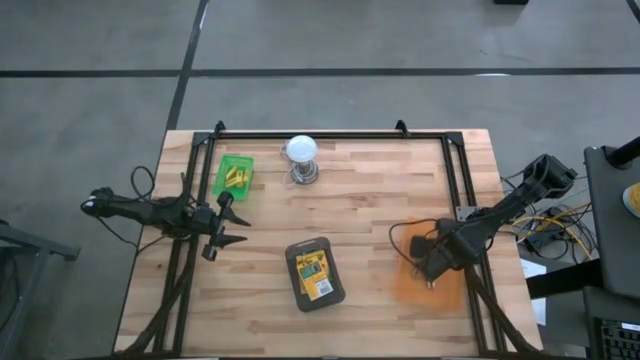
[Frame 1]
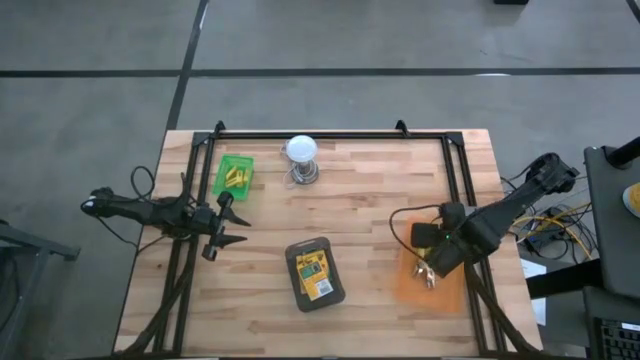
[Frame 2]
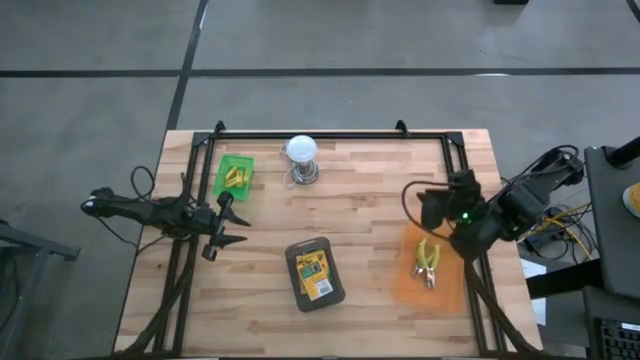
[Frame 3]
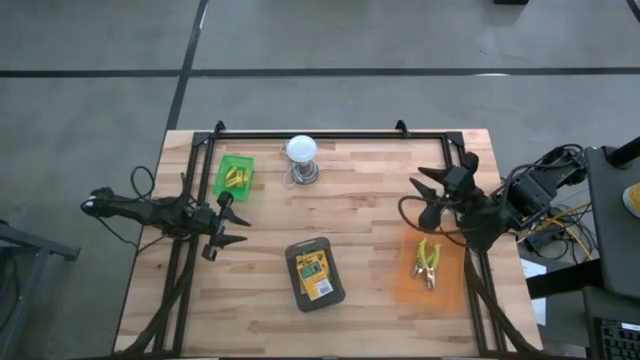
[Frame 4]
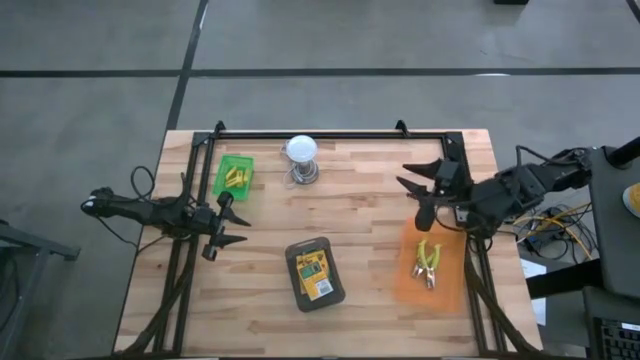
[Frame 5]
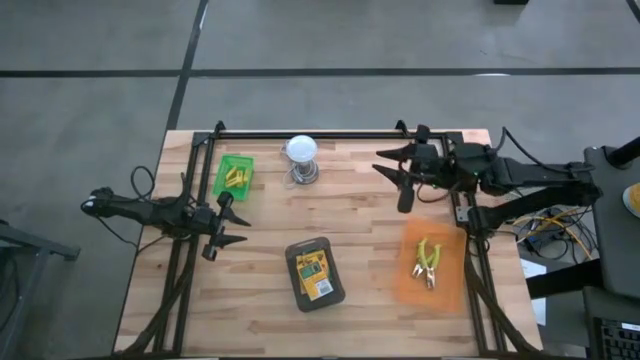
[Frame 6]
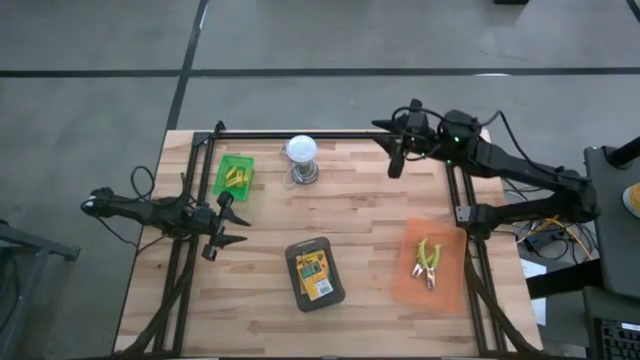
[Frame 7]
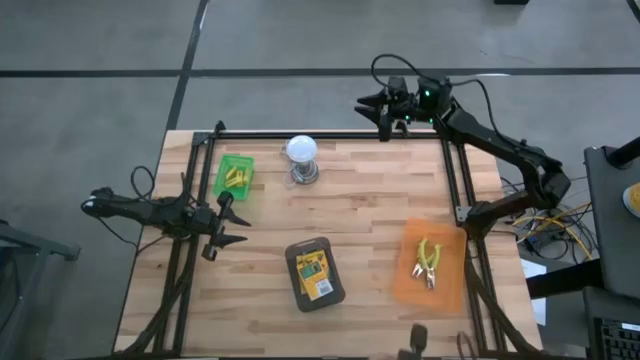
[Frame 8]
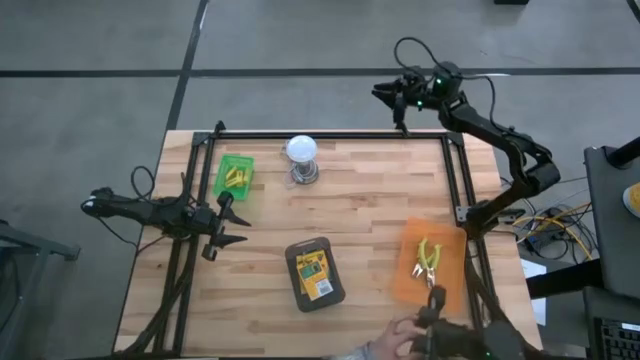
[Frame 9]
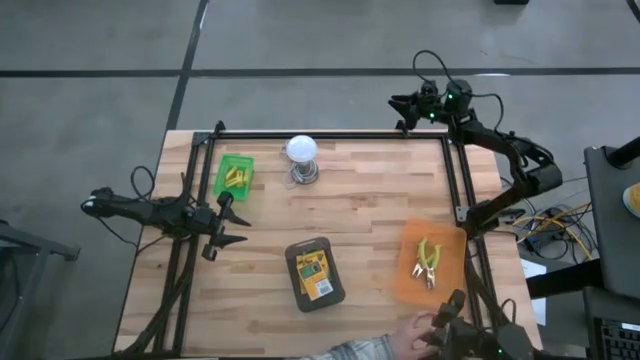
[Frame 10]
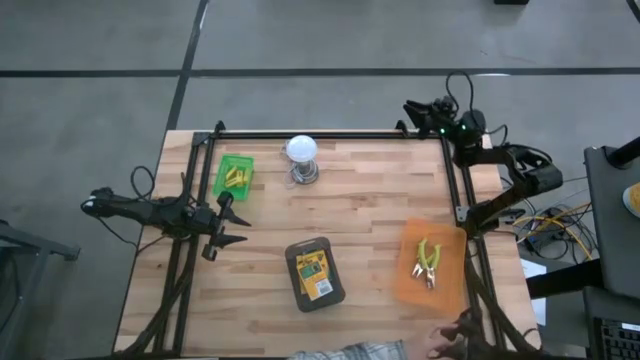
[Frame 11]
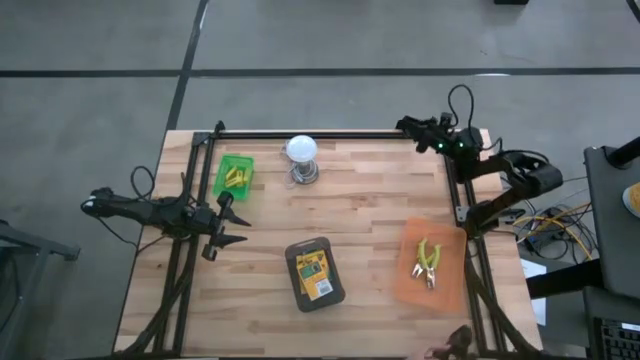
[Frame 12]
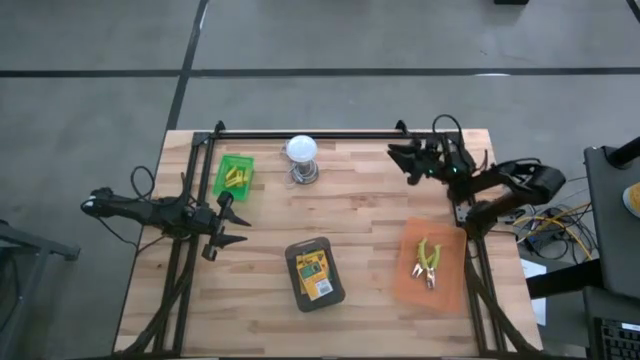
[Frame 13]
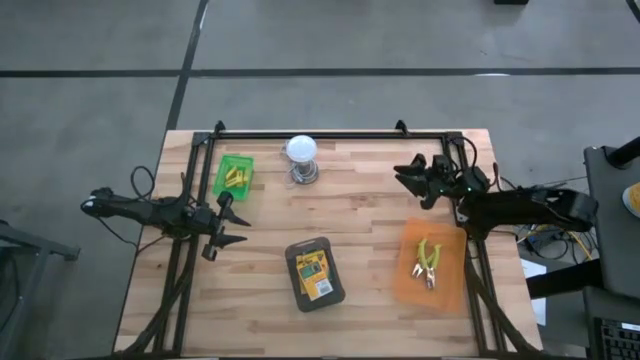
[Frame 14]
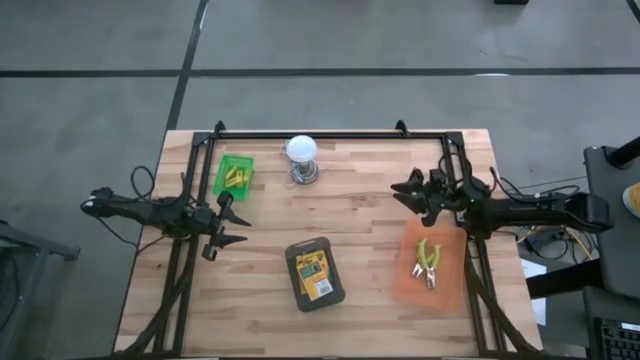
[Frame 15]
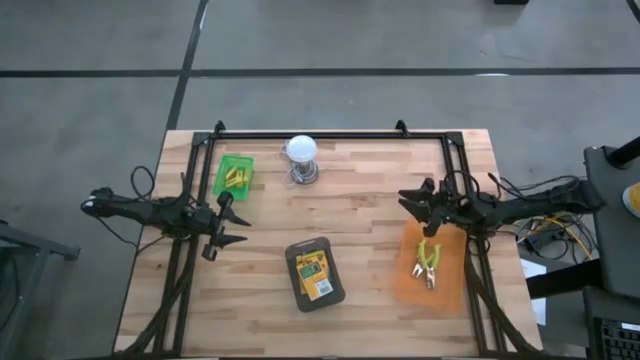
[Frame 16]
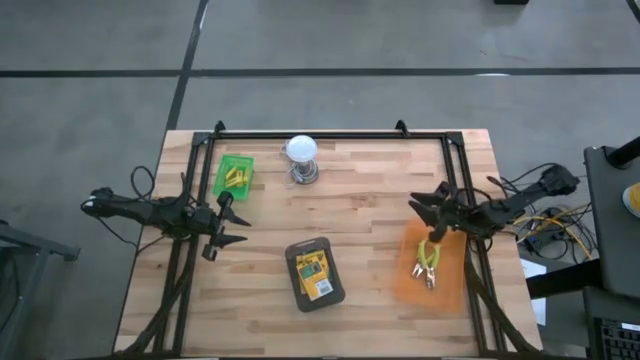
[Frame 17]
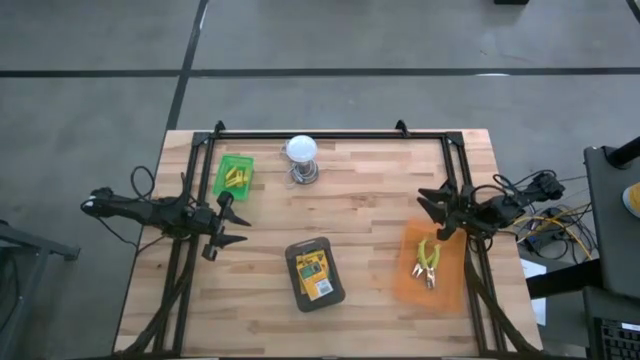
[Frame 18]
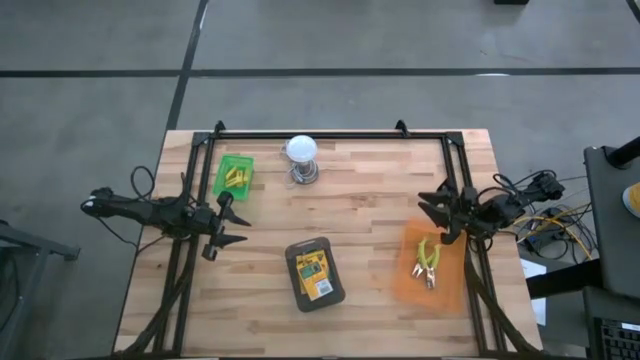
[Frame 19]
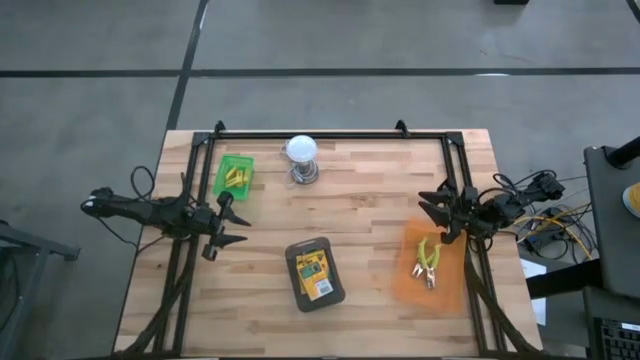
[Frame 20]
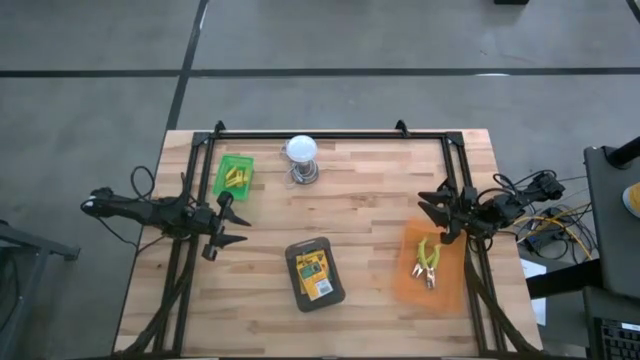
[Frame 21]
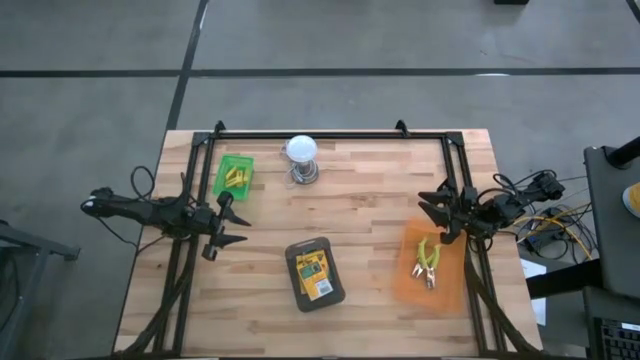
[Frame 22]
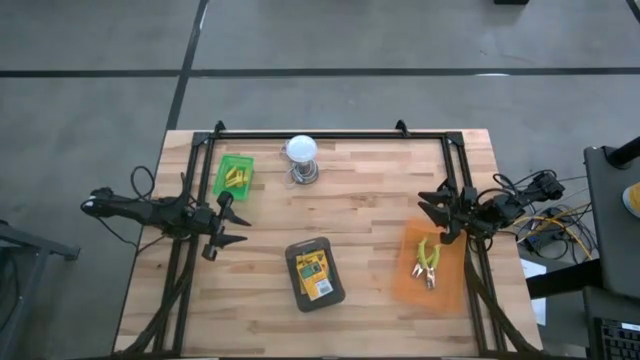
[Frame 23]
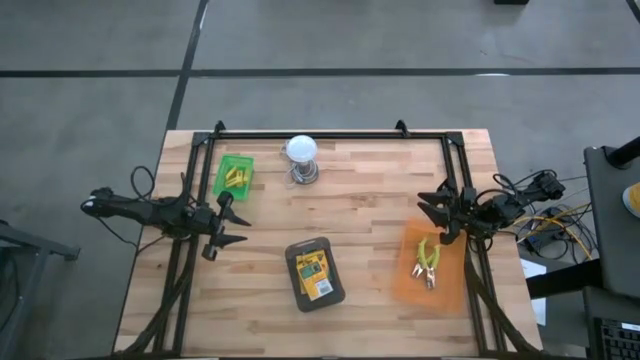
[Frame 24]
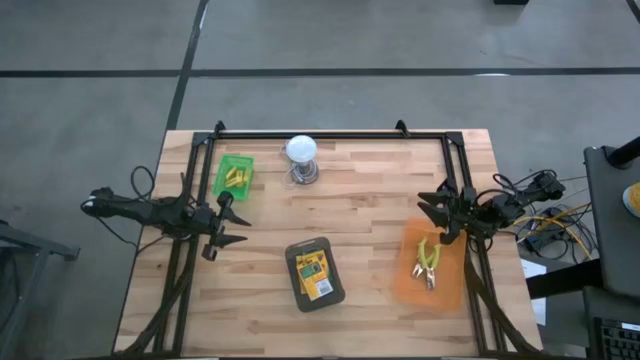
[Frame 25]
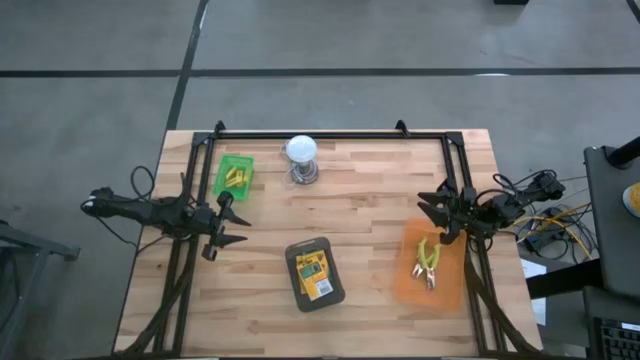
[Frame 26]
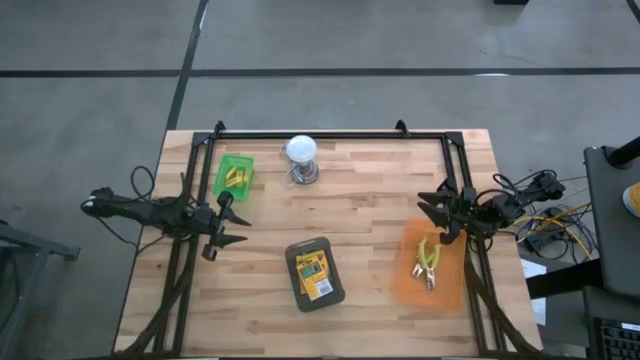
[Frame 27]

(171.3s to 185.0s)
Task: Pick & Place School Supplies
Return to Home Position

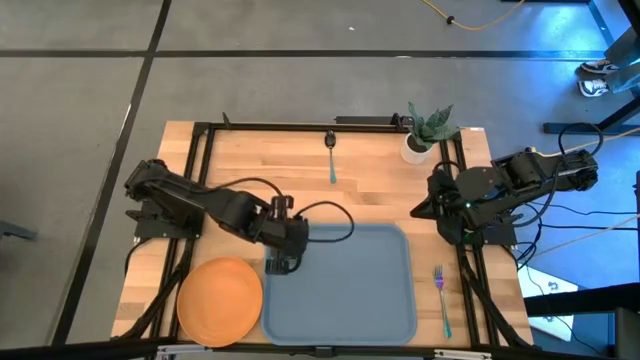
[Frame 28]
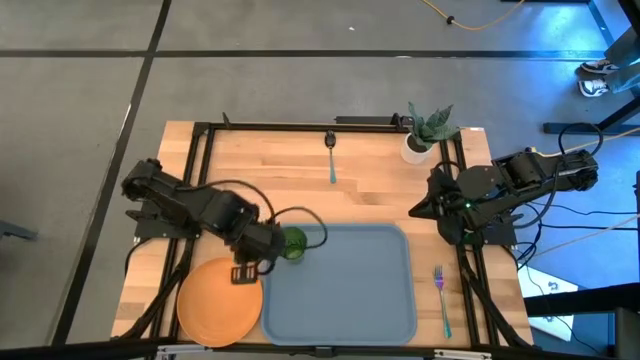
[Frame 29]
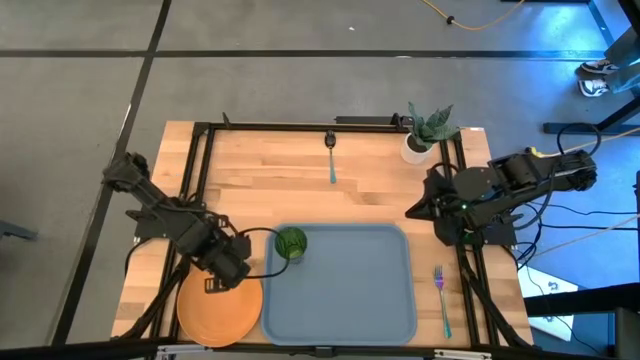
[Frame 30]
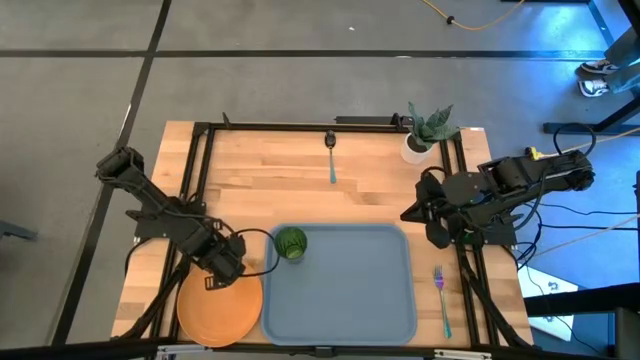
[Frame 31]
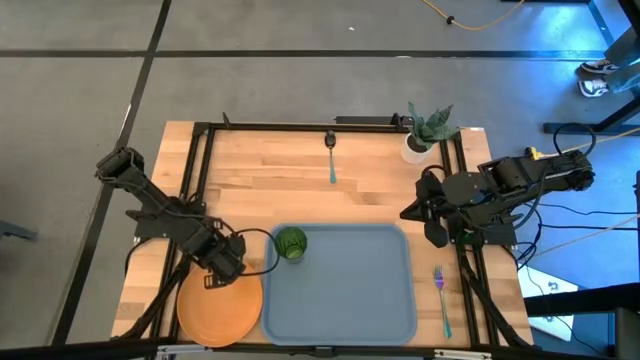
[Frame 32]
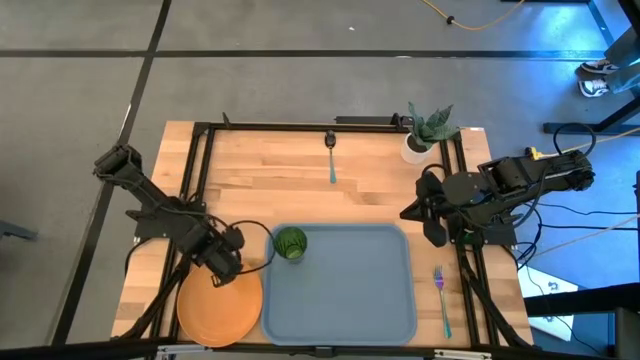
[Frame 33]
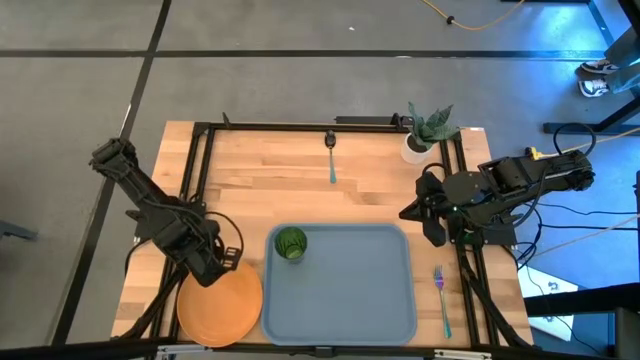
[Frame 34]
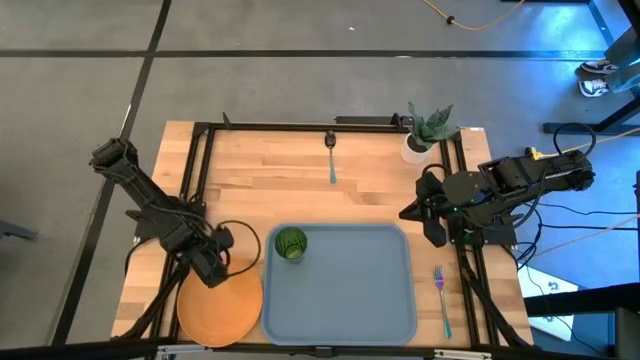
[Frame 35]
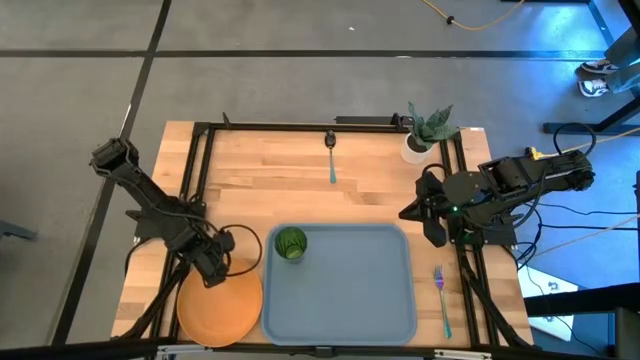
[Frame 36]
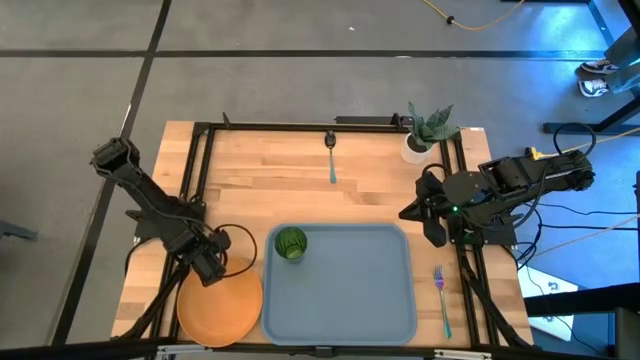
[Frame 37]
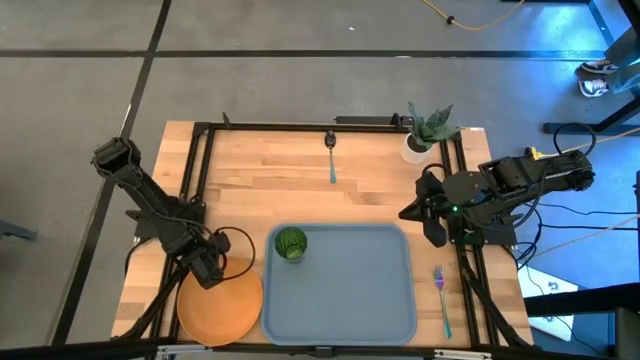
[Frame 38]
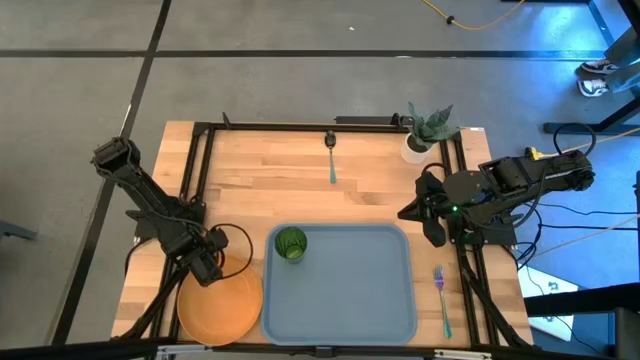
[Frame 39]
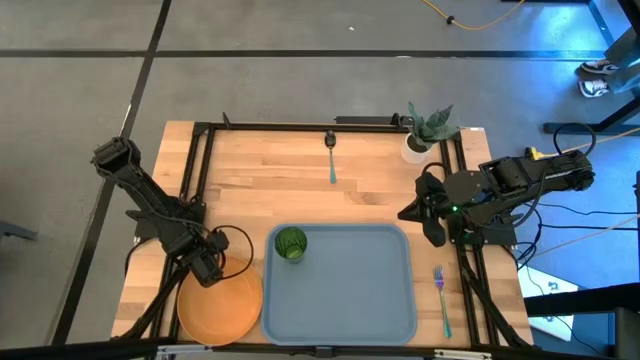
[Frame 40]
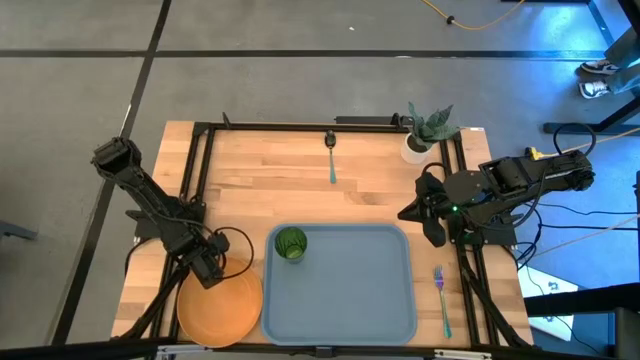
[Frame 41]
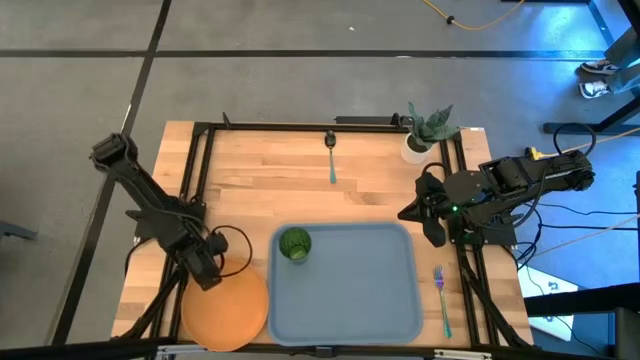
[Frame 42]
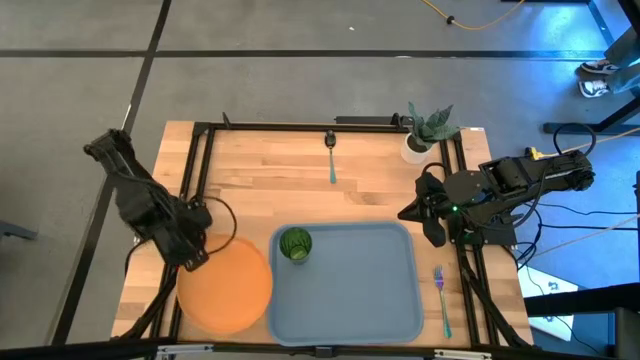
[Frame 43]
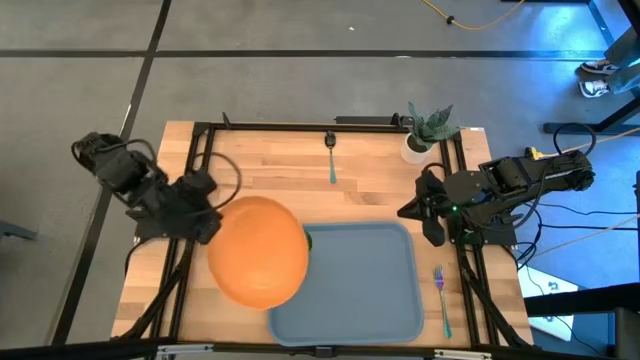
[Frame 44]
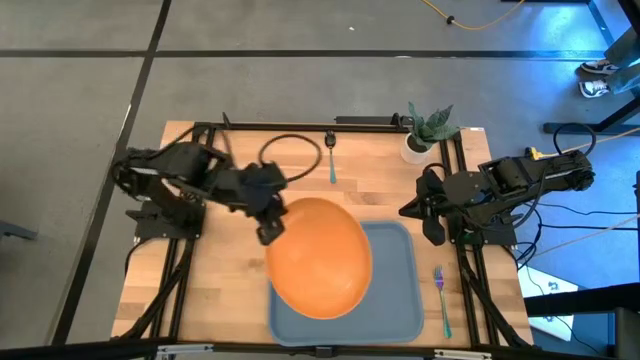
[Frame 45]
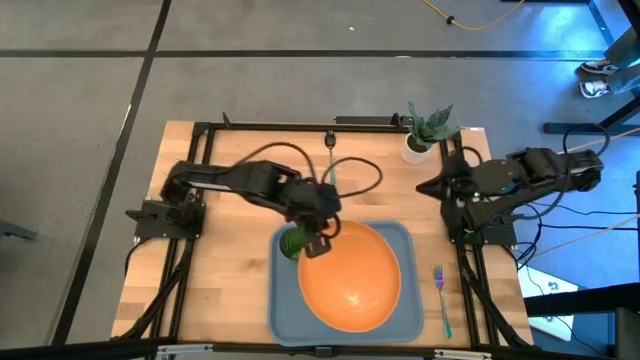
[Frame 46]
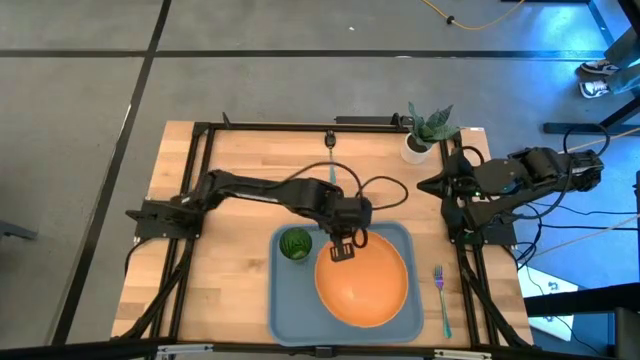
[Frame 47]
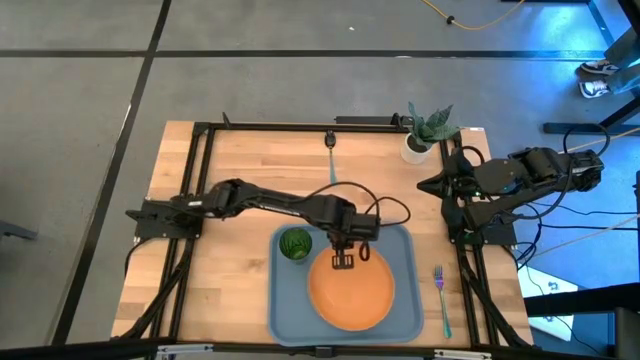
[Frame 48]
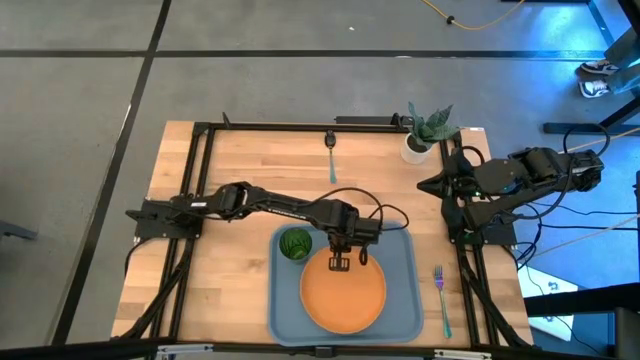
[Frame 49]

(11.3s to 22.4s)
Task: Pick and place plate/cup/fork/spoon on tray
Put the orange plate on the center of the gray serving tray
